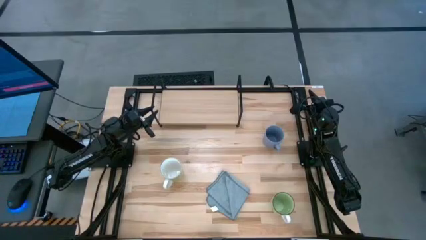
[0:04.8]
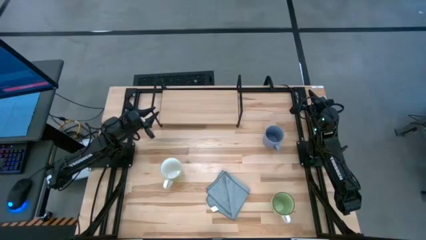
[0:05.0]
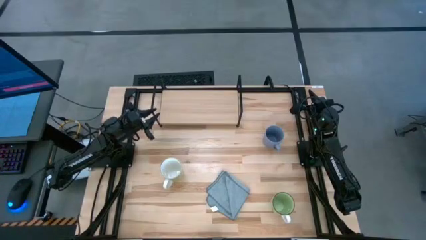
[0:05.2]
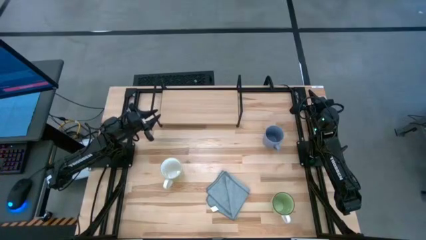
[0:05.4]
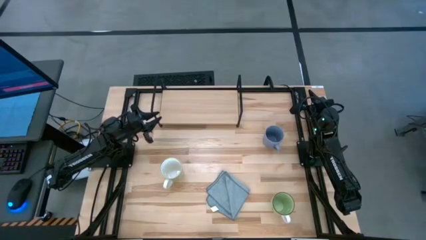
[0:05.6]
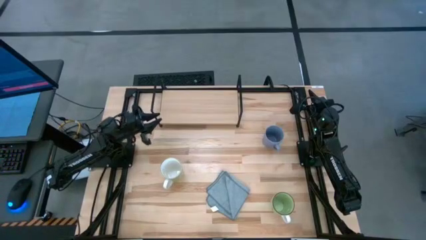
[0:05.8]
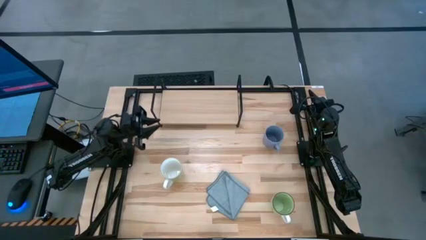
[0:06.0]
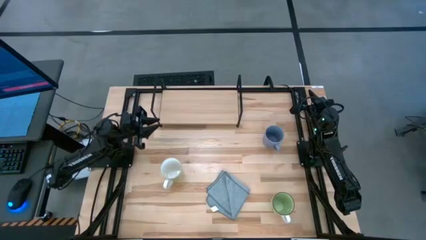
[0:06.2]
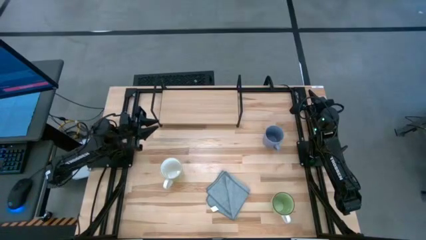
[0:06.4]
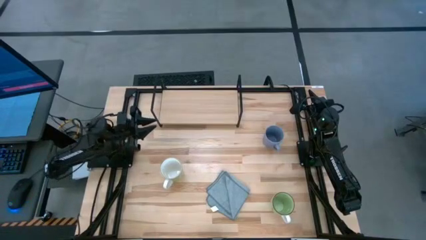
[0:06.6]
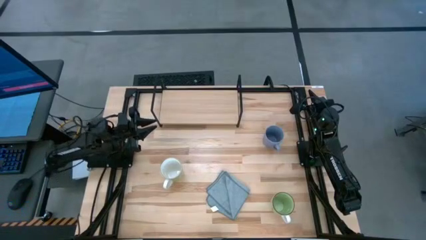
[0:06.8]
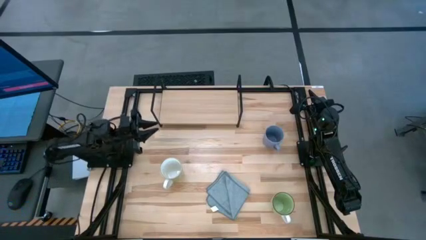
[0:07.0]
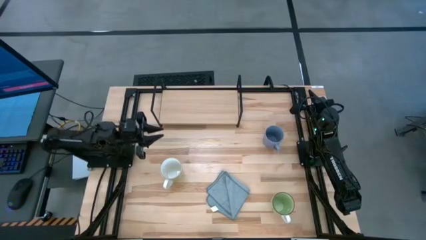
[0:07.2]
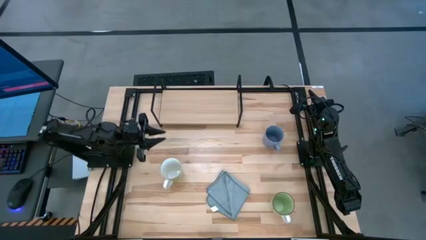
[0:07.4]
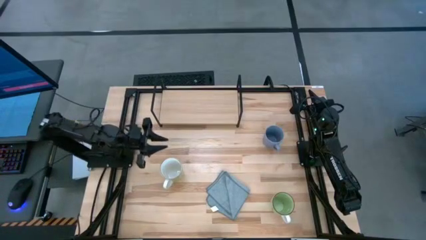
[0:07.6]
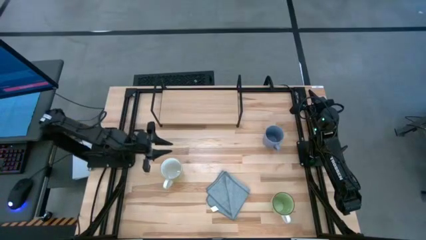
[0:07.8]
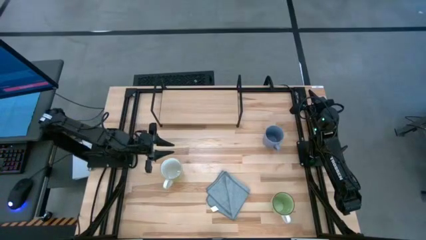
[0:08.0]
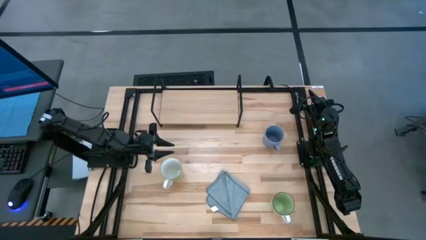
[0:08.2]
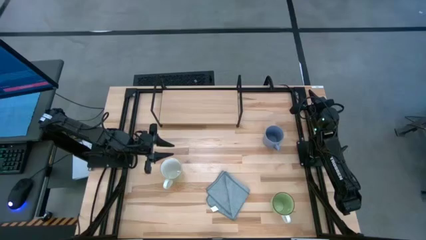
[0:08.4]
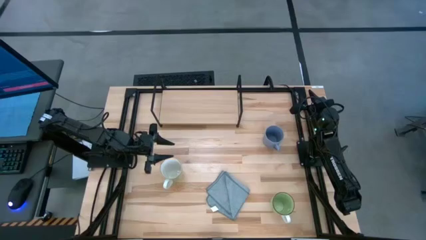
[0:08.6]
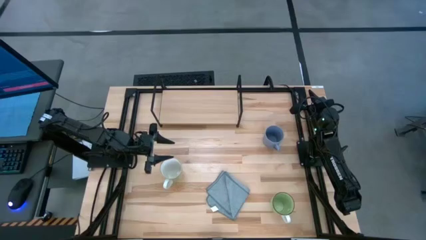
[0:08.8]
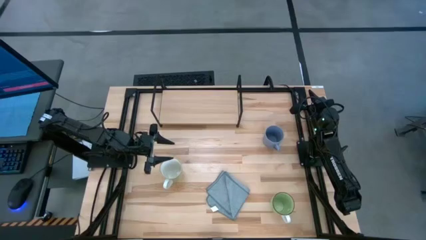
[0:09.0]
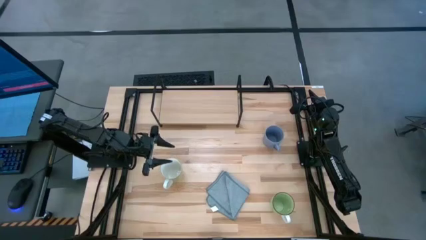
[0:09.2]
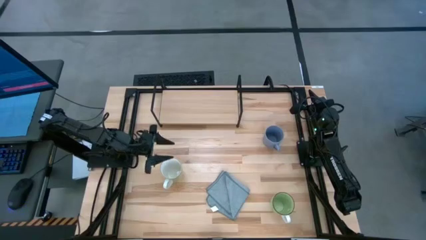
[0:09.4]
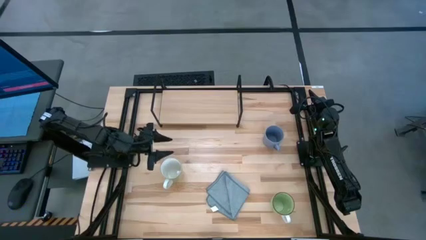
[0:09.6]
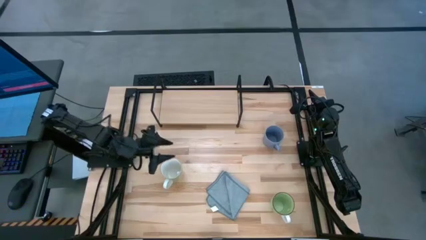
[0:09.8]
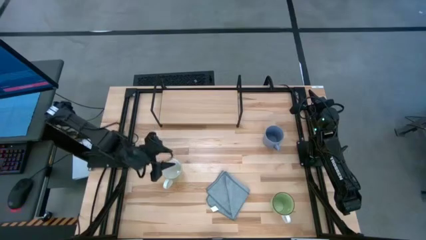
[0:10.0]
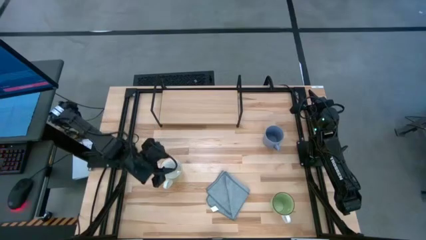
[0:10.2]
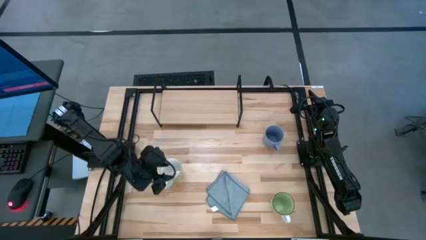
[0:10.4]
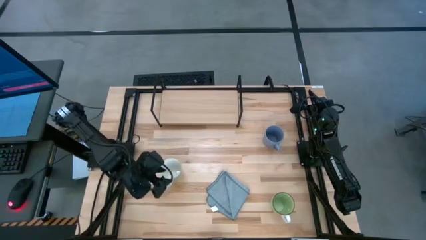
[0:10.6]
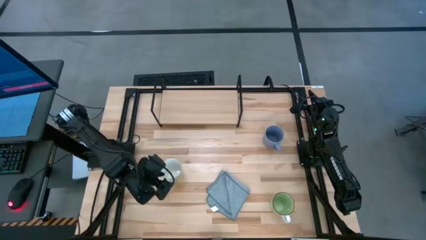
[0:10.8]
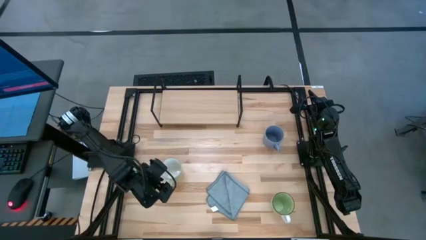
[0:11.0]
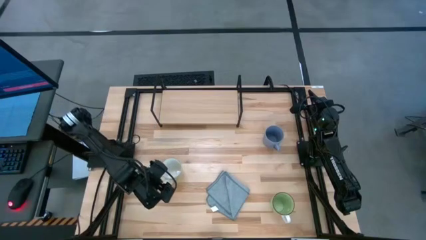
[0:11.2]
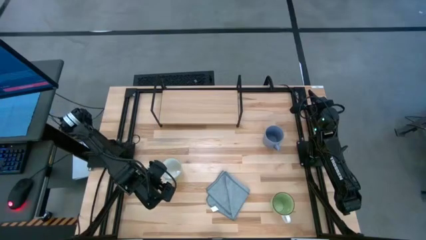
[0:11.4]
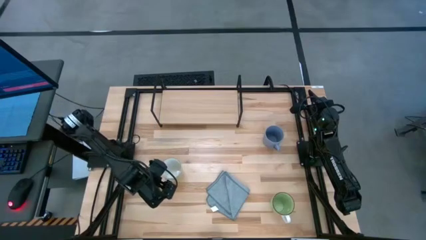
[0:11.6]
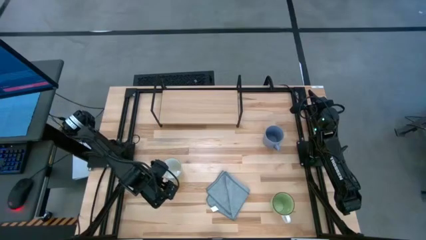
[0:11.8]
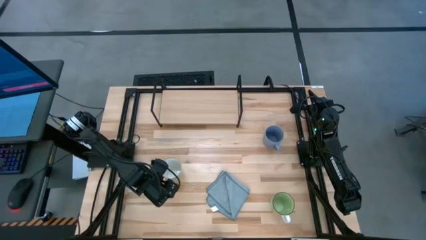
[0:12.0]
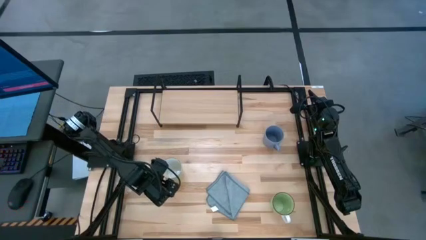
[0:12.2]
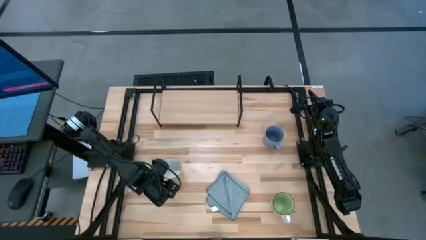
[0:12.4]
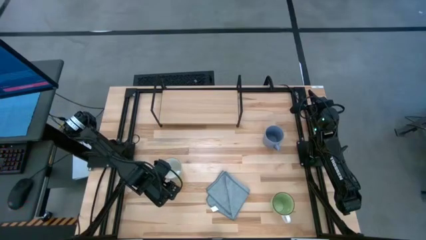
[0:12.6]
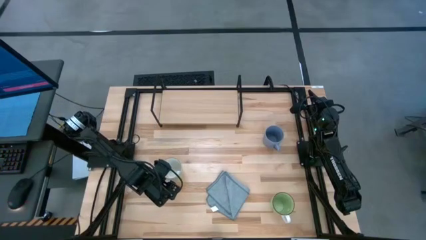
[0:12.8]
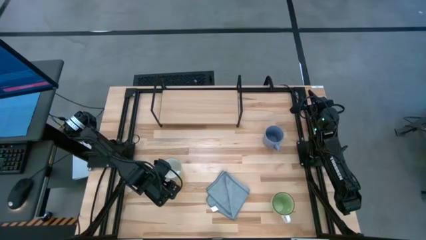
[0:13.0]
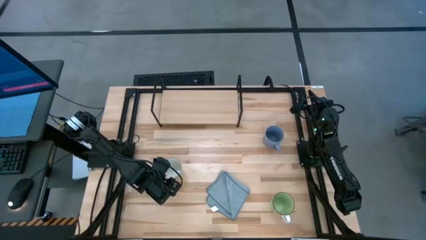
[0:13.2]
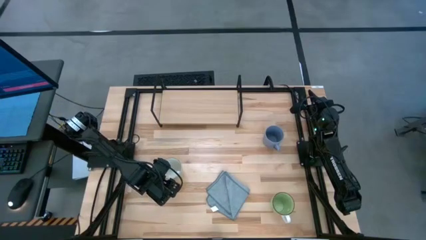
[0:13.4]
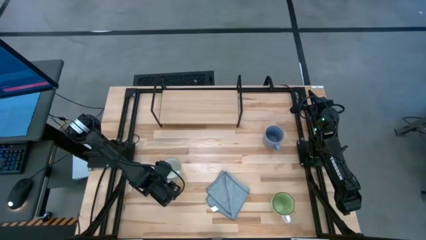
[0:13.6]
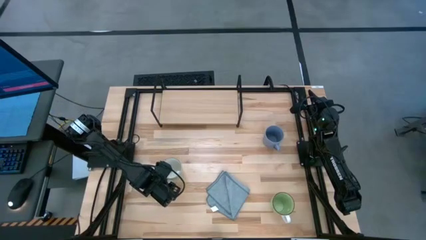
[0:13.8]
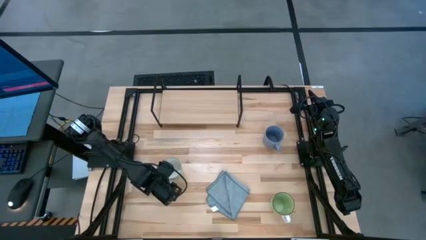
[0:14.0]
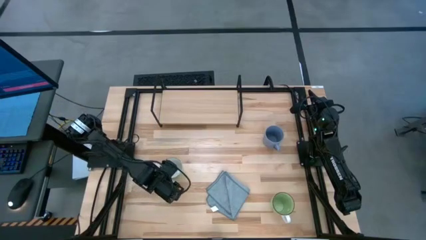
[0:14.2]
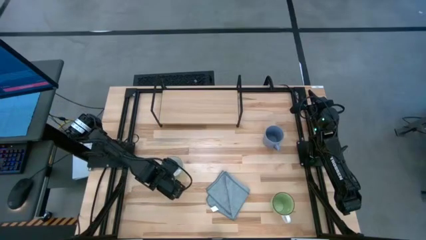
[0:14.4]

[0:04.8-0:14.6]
Task: Stack small to large cups/mugs on shelf
Put the green mug on the shelf

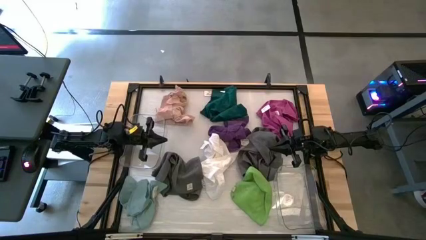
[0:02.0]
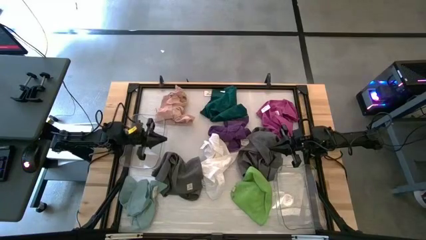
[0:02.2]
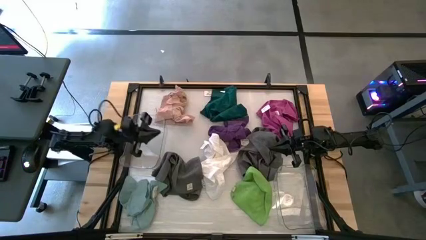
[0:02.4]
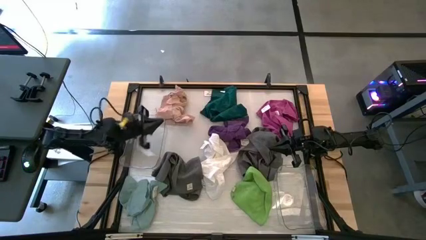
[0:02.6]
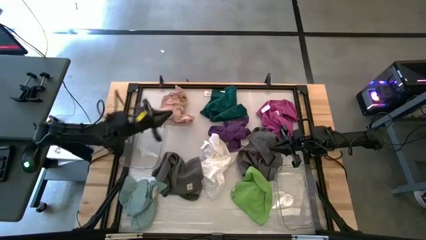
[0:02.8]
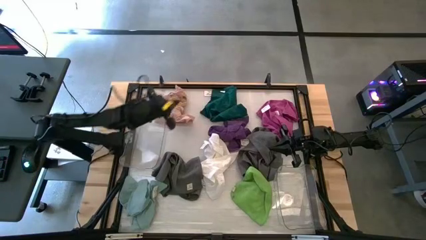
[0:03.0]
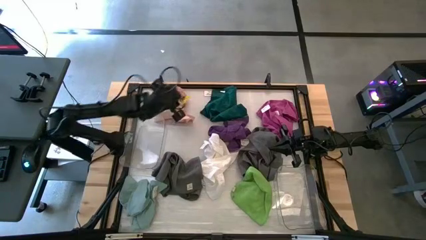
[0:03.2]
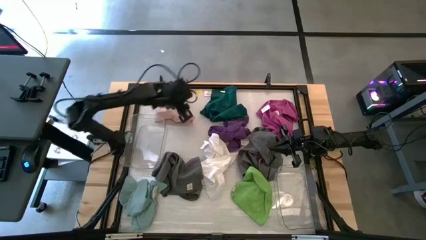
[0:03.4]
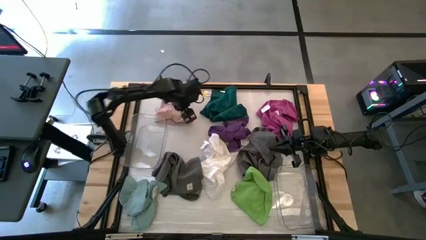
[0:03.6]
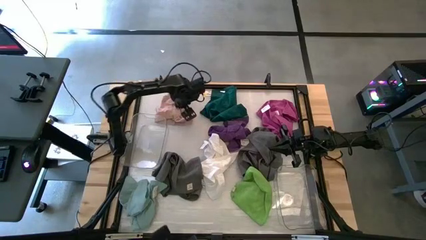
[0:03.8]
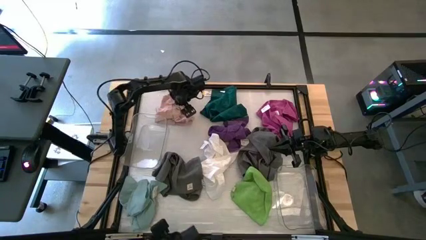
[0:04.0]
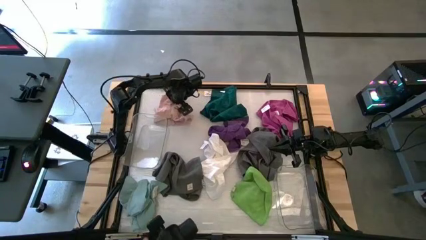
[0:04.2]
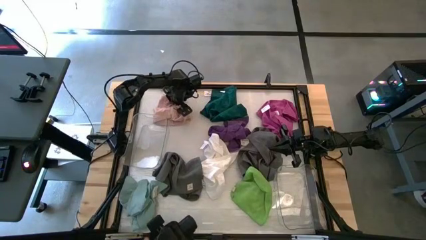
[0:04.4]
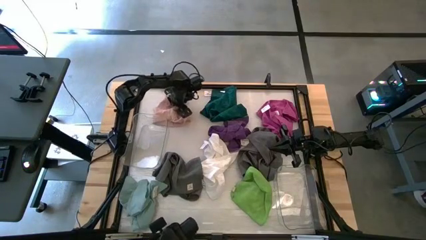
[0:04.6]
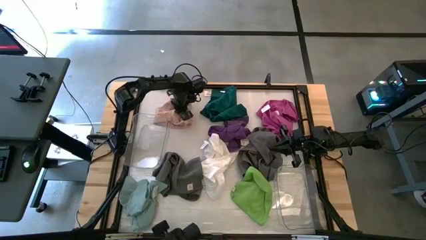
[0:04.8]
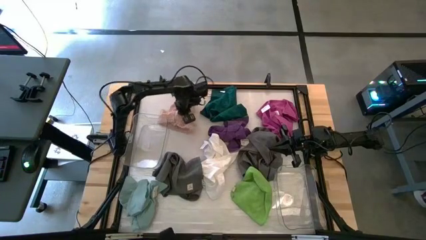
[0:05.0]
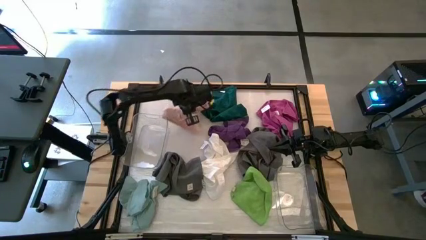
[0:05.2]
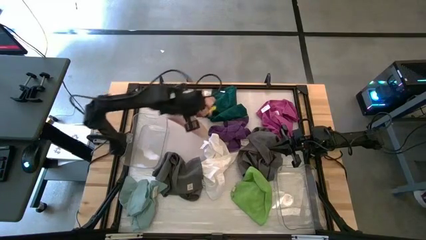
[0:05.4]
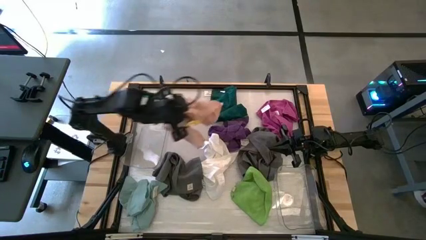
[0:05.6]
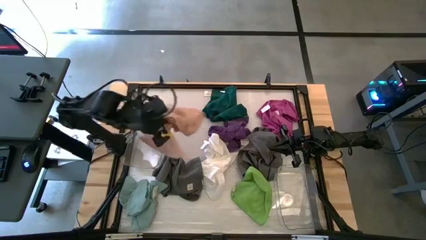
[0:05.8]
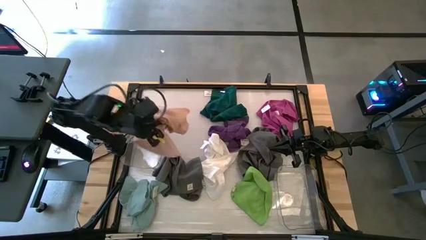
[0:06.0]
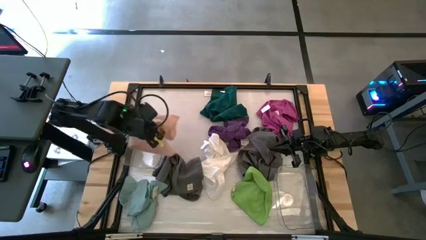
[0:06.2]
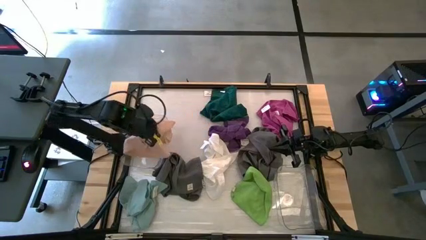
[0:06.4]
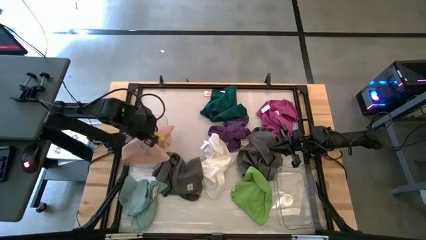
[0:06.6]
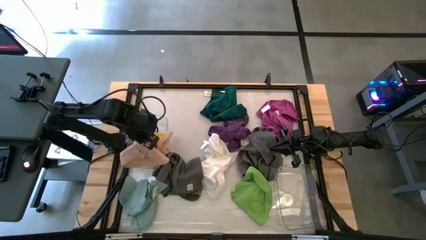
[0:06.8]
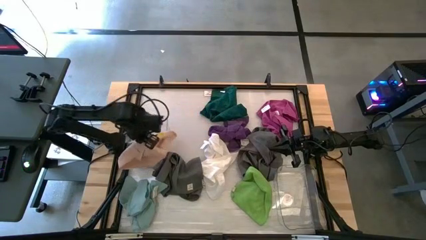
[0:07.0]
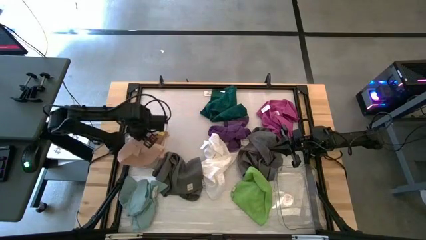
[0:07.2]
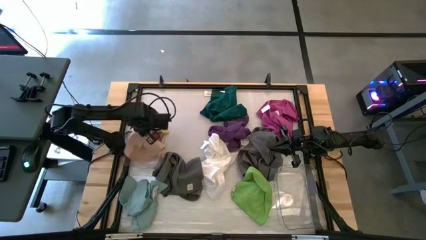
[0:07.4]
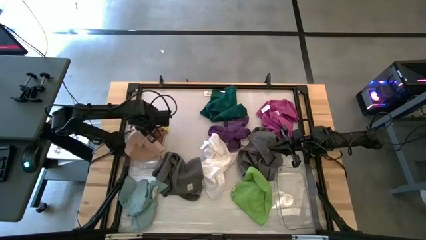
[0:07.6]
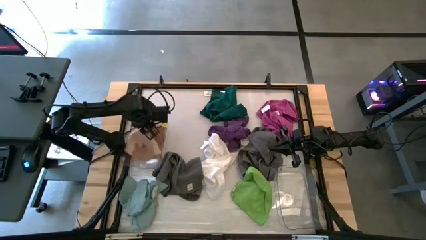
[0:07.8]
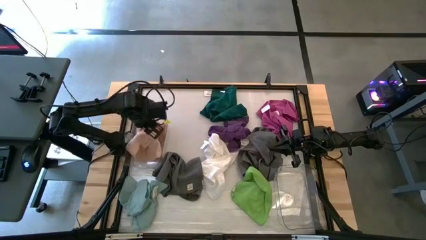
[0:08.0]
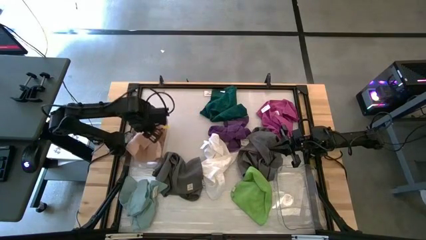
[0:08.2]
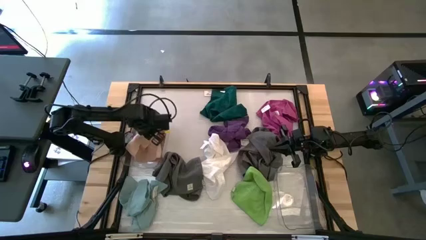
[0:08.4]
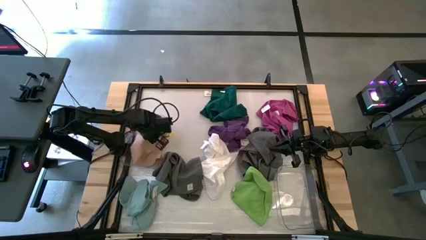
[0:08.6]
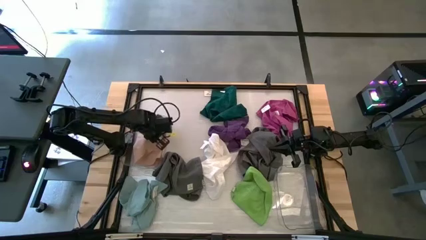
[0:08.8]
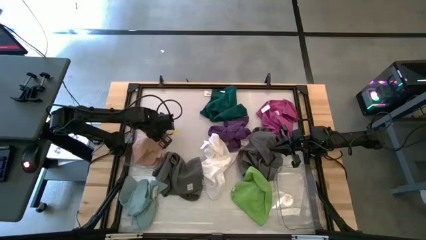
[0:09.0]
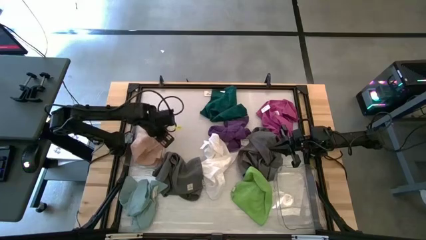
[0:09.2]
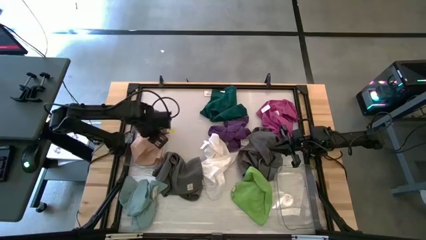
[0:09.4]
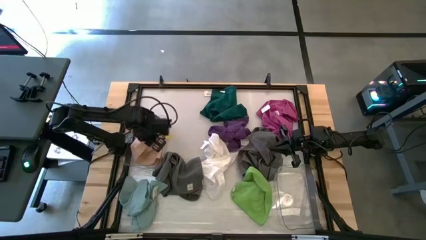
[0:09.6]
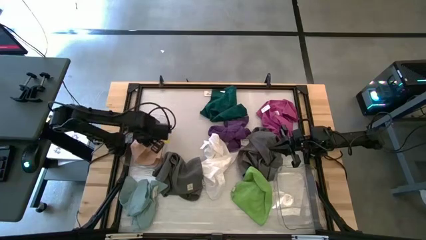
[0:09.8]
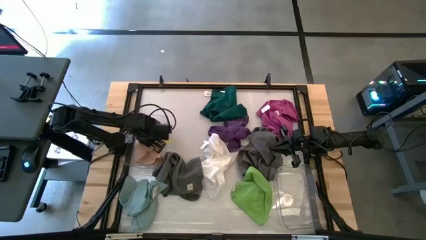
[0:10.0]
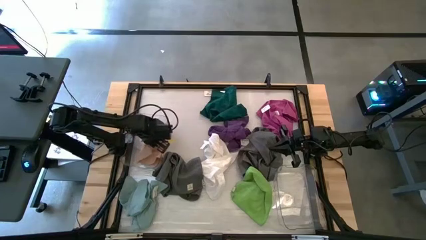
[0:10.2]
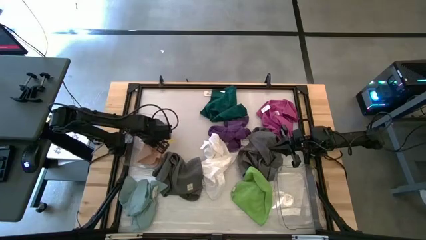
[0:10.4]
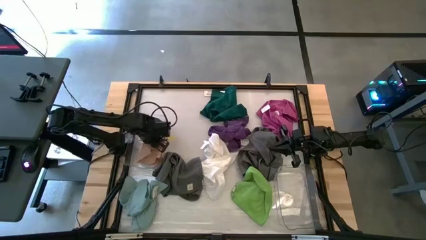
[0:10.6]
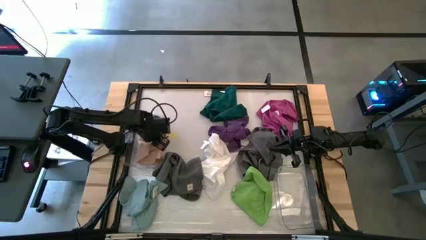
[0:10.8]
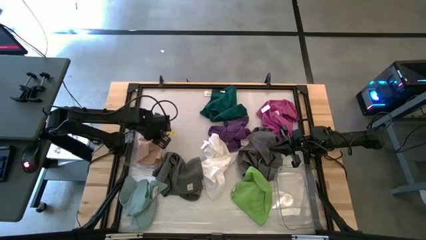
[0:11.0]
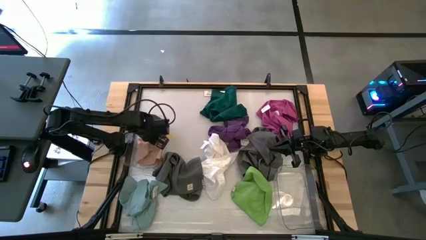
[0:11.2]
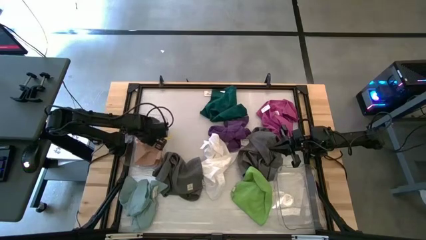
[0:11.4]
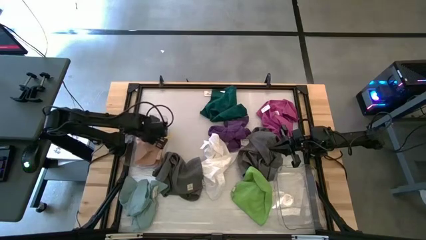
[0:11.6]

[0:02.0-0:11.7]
Task: Sort towels by color in basket
Put the light pink towel into the left transparent bin
